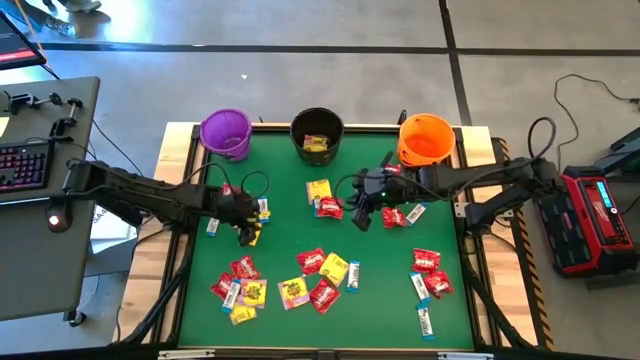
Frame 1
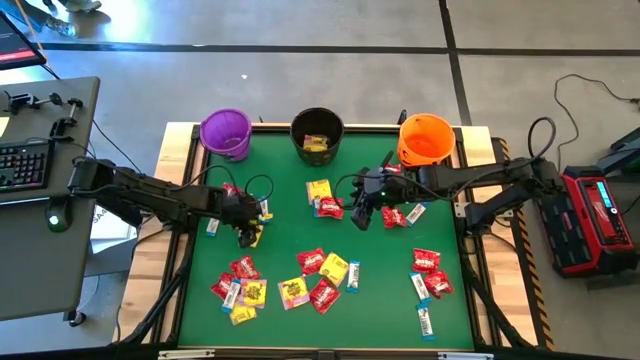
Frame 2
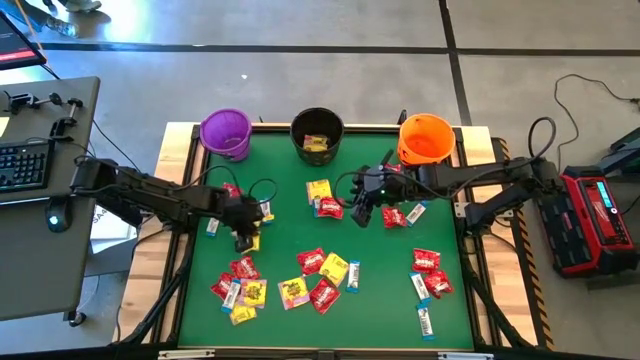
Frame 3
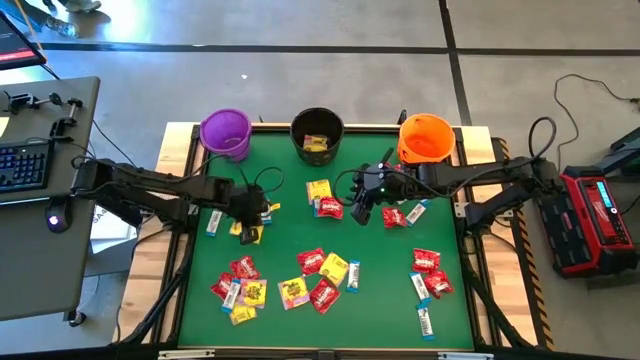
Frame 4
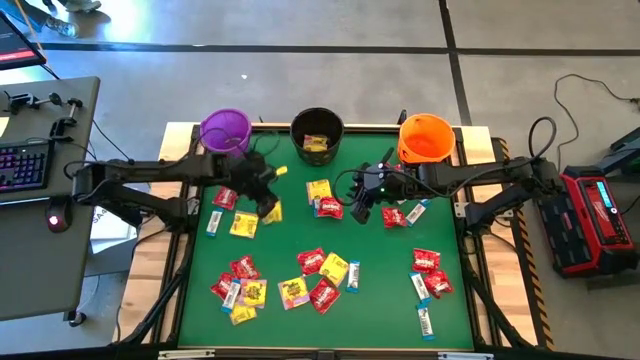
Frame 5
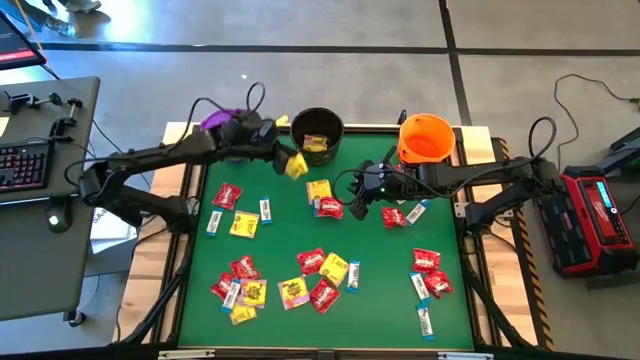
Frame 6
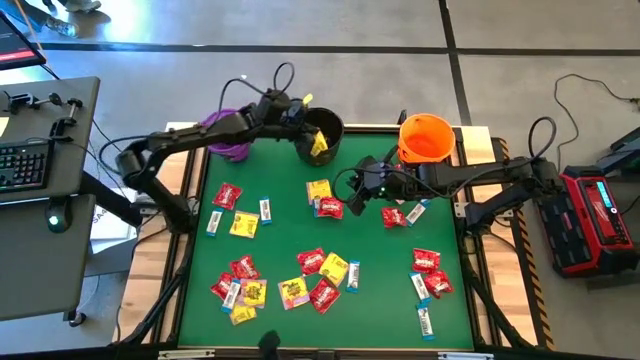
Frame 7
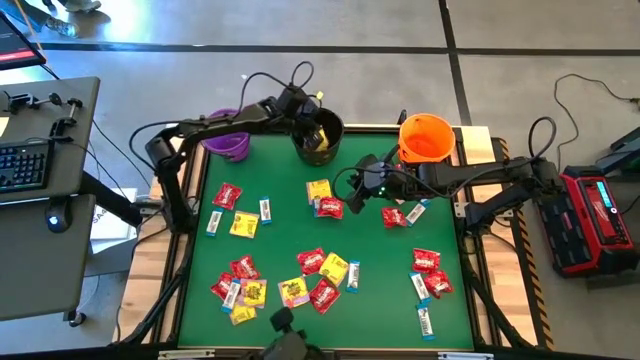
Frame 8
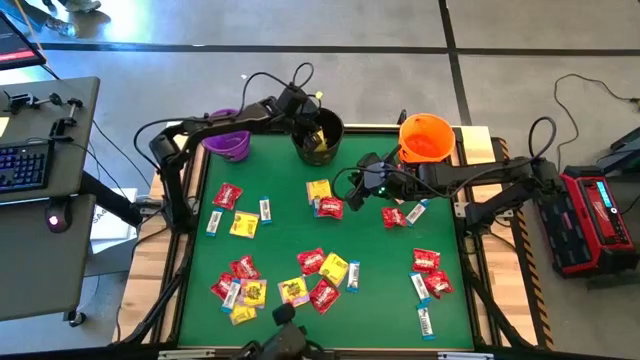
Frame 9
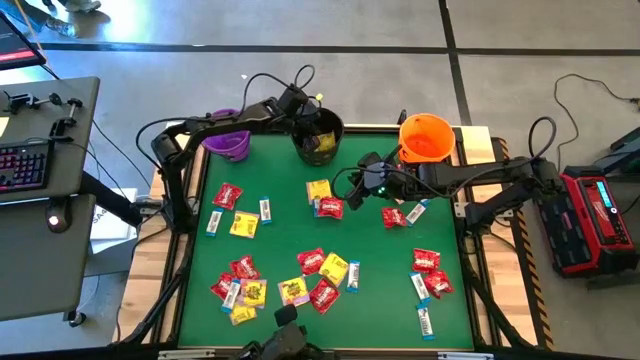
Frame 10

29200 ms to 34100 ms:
Task: Sort candy by brand, put in halloween buckets
Put the yellow candy pack into the black bucket

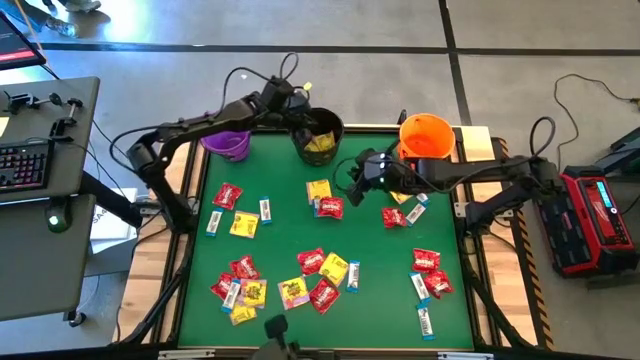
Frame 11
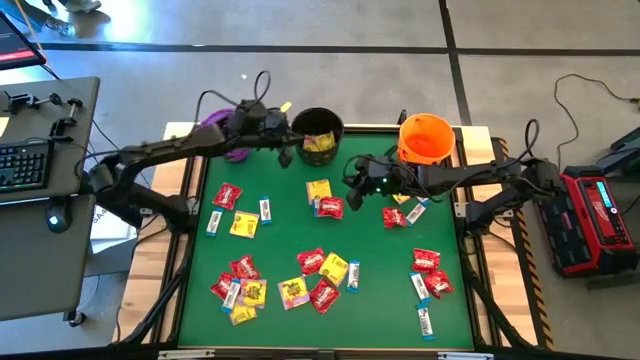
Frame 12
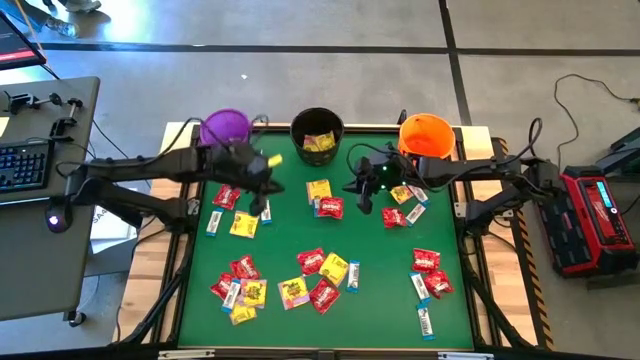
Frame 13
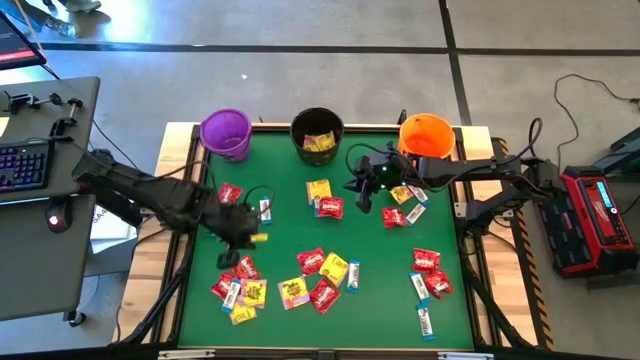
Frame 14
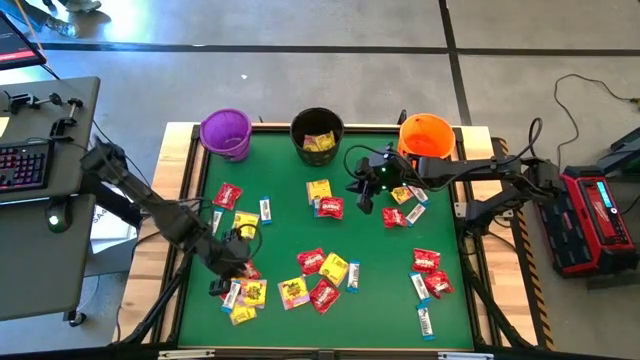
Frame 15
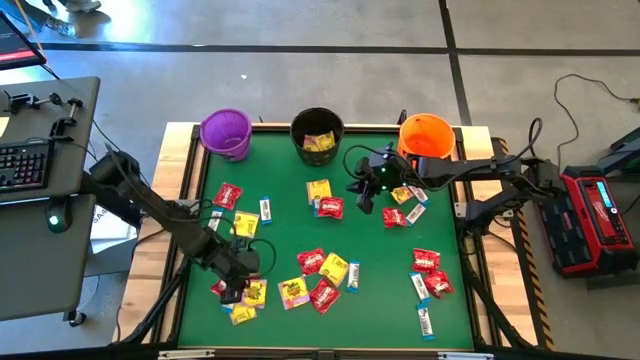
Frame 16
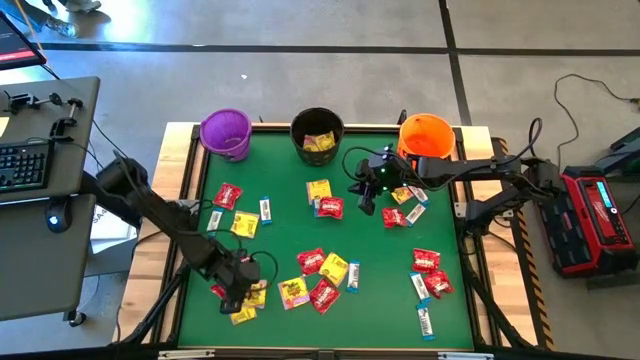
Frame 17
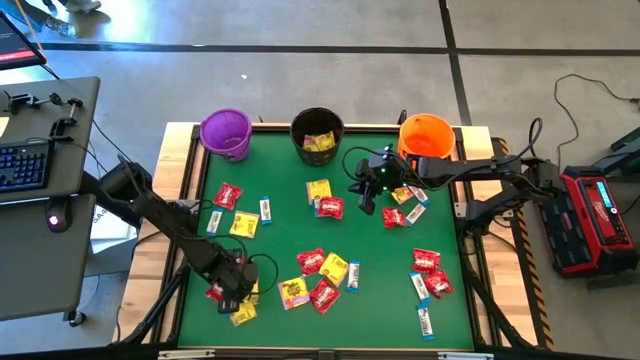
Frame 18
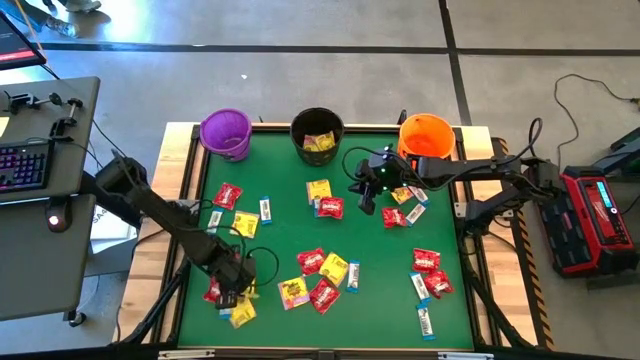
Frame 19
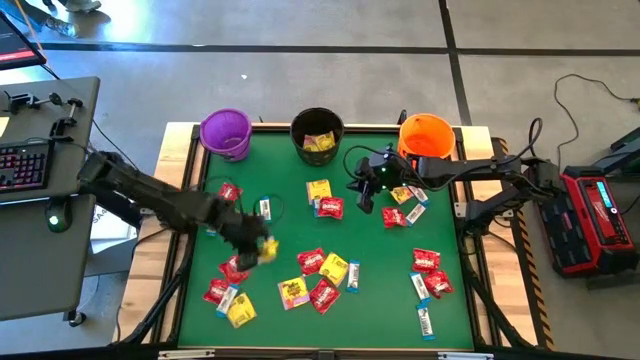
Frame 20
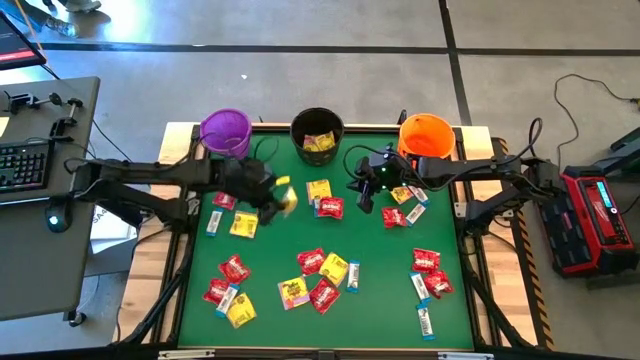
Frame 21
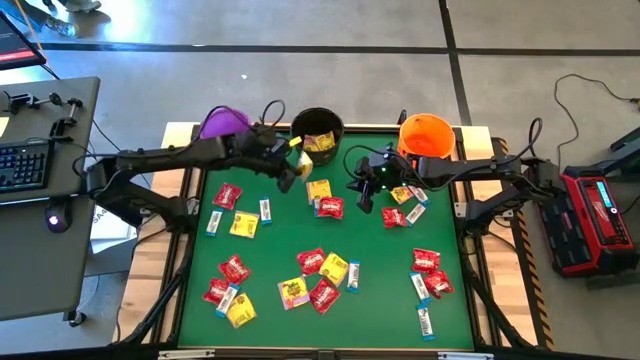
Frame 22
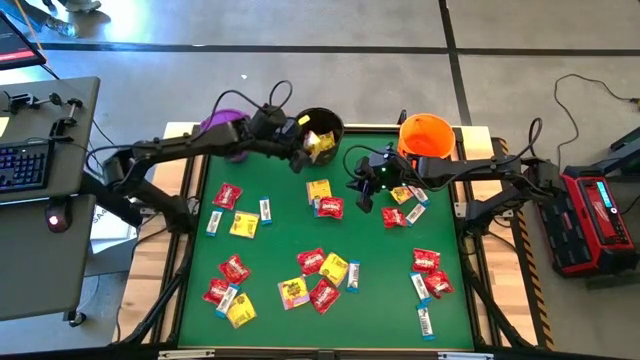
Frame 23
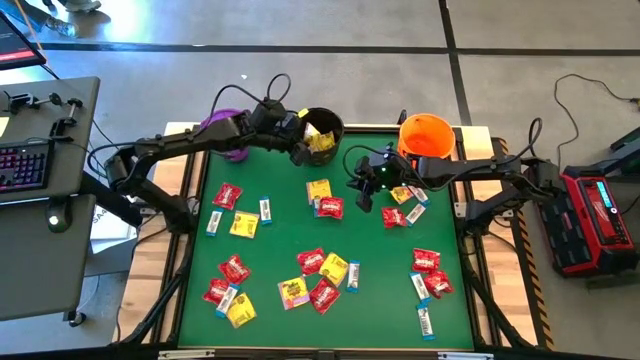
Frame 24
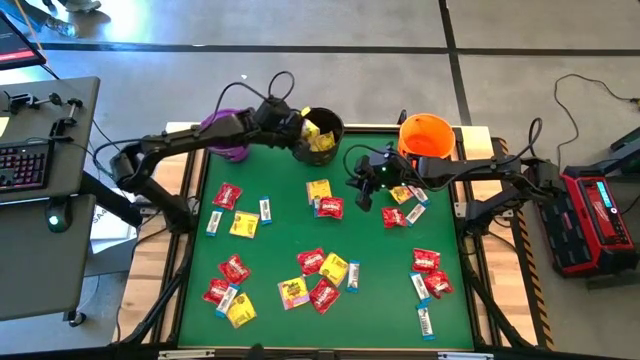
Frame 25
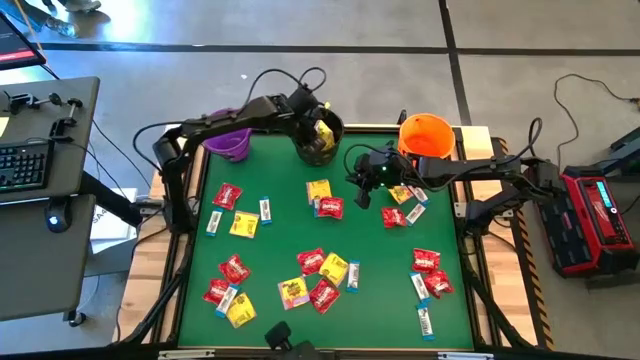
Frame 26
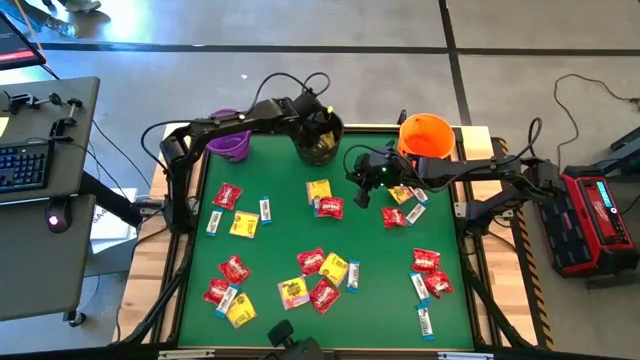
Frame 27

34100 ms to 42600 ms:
Put the yellow candy pack into the black bucket

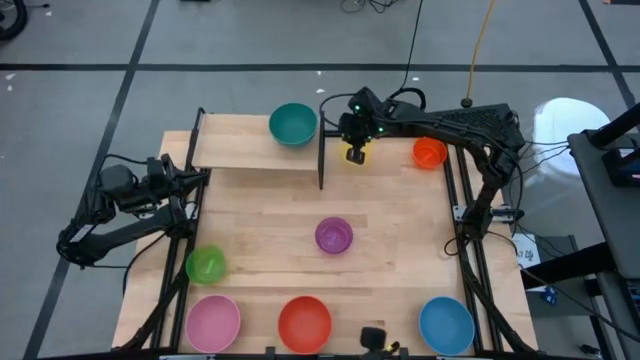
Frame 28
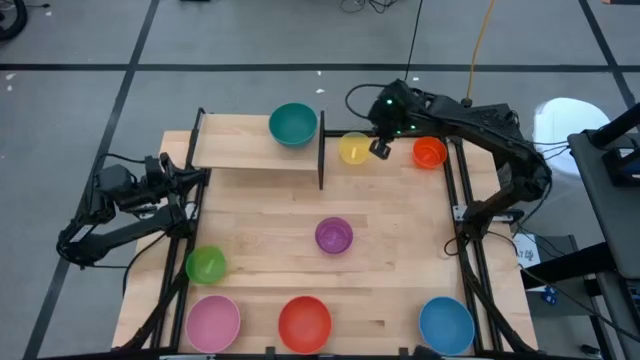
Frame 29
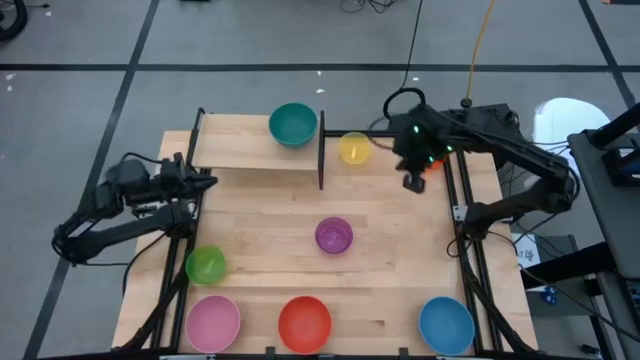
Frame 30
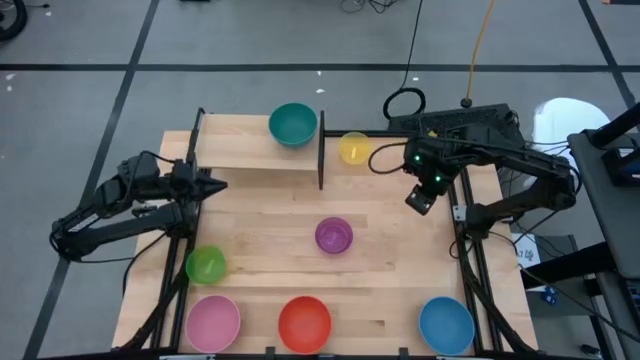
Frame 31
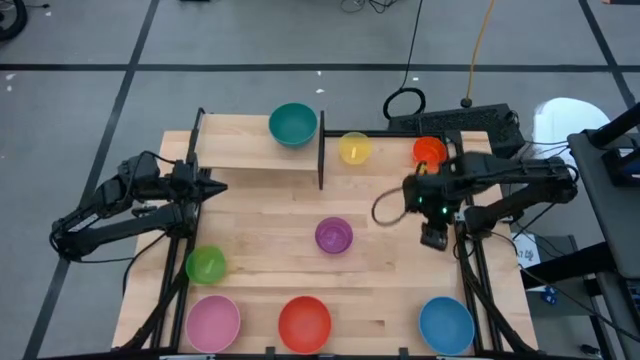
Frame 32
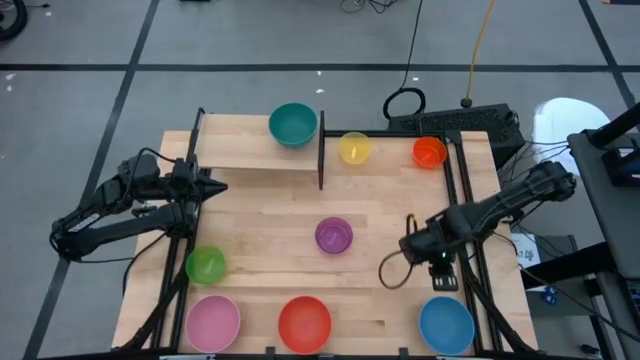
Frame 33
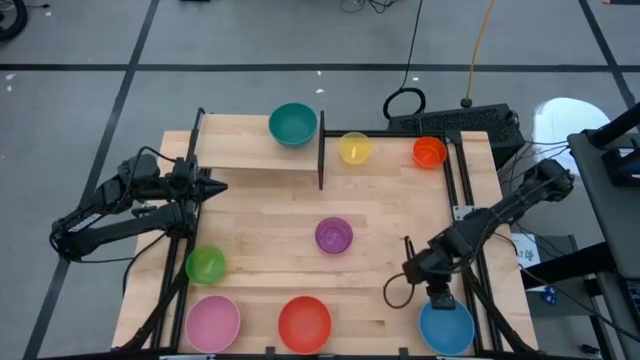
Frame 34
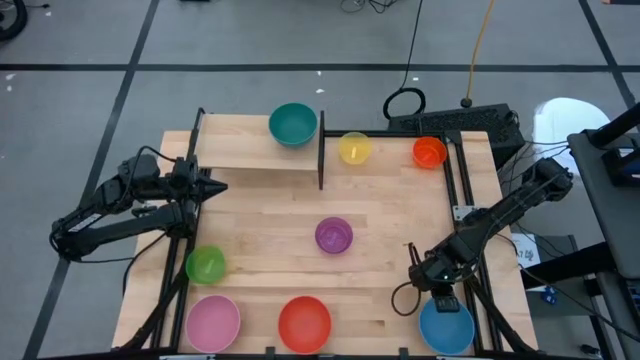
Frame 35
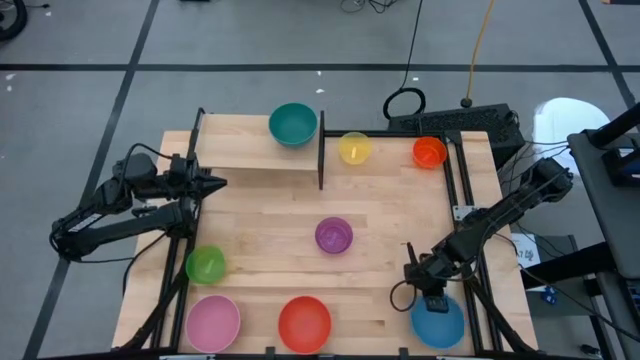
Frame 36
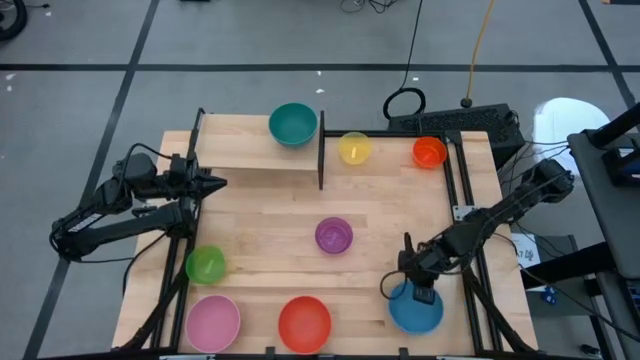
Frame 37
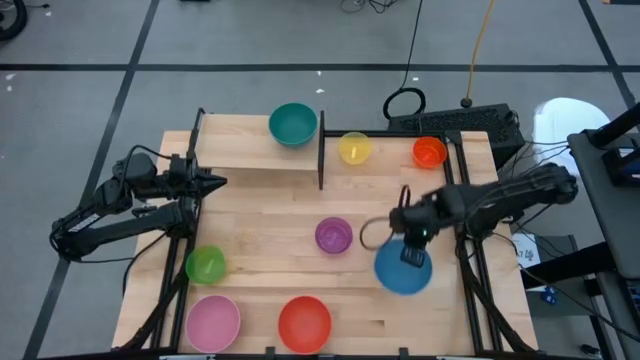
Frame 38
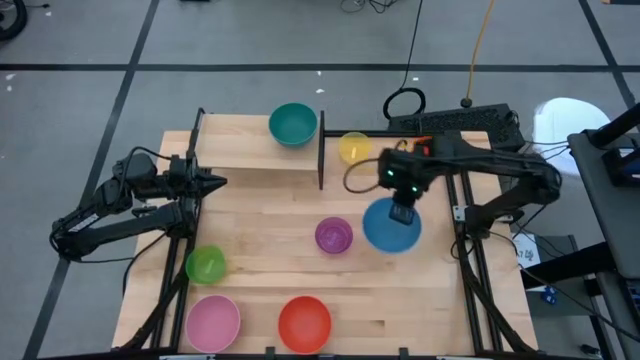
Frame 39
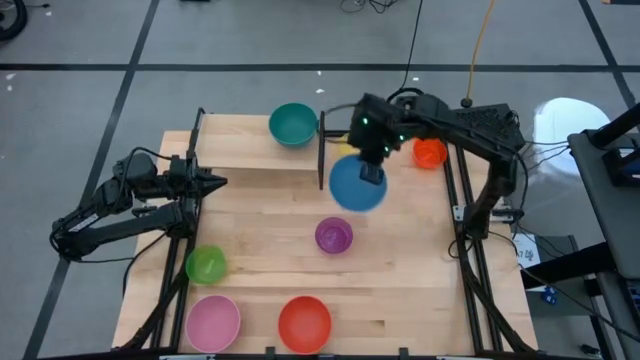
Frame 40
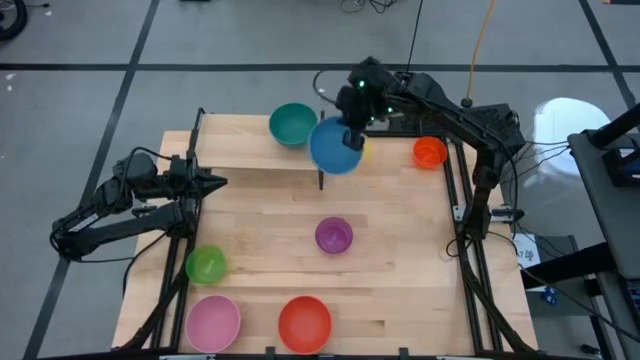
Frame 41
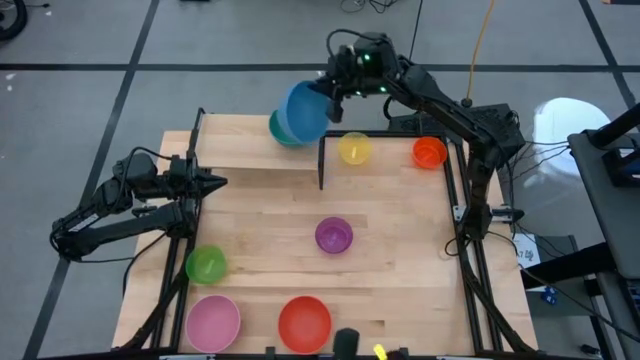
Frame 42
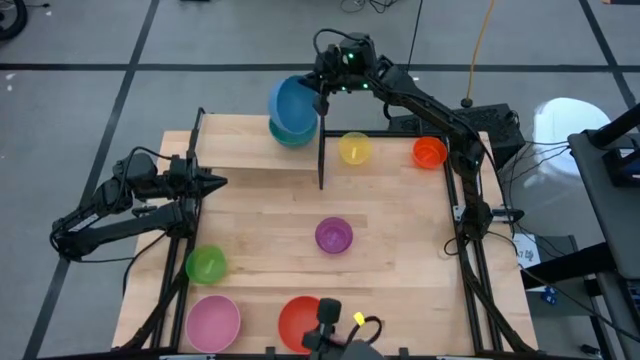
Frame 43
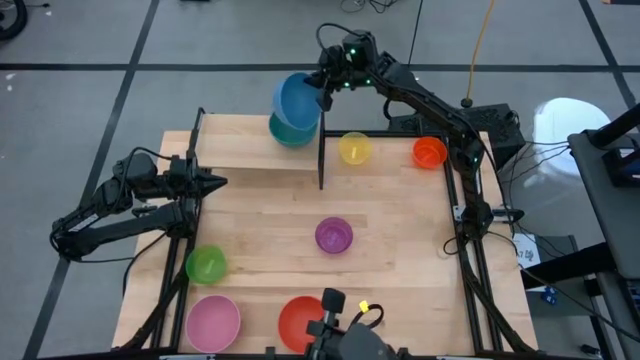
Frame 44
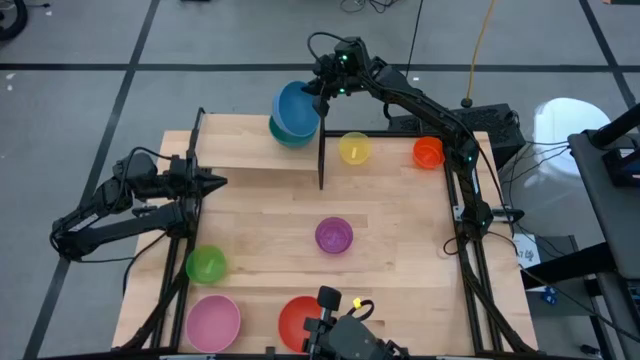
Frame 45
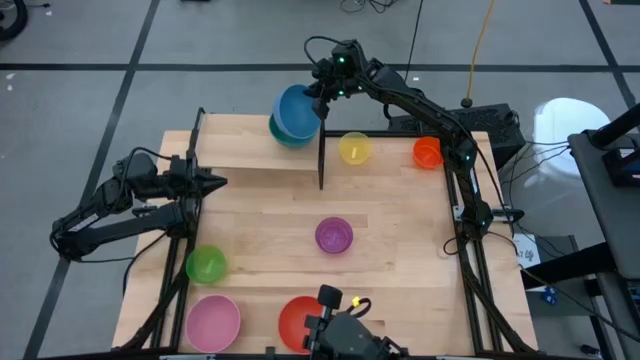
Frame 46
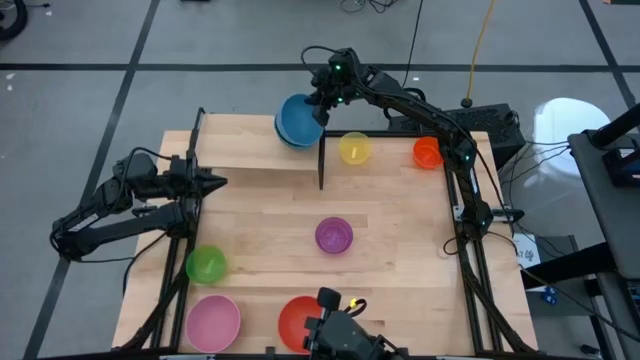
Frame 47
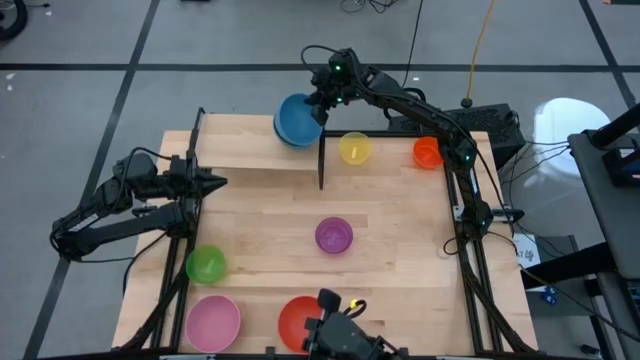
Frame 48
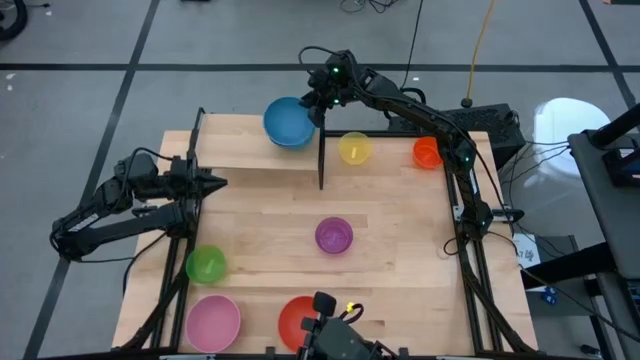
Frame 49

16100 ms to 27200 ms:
Task: Place and stack bowls onto a shelf
Stack the blue bowl on top of the green bowl on the shelf
